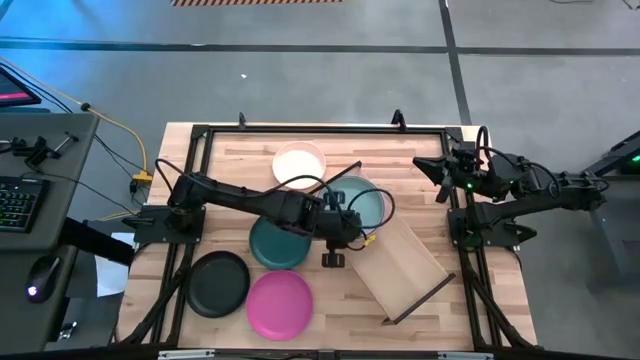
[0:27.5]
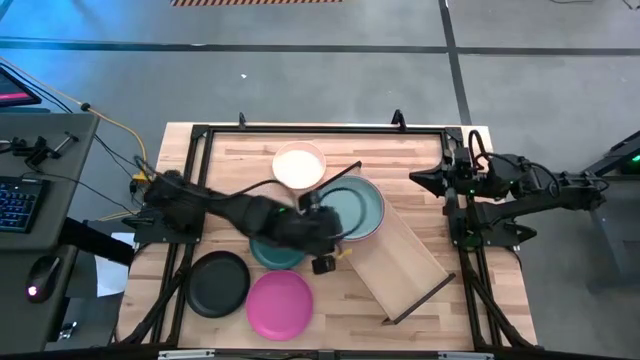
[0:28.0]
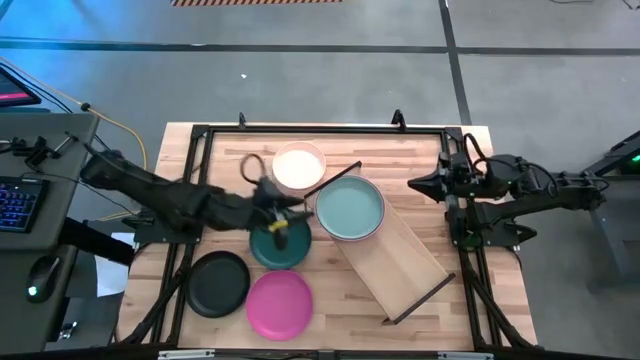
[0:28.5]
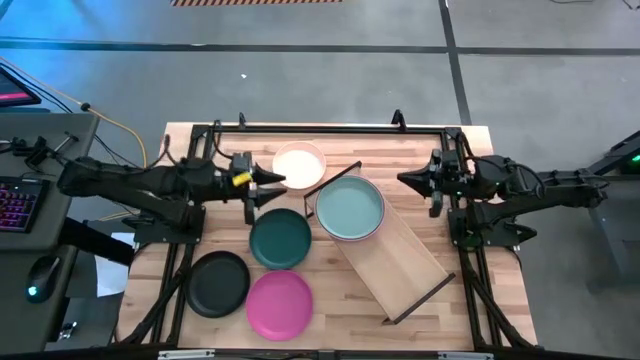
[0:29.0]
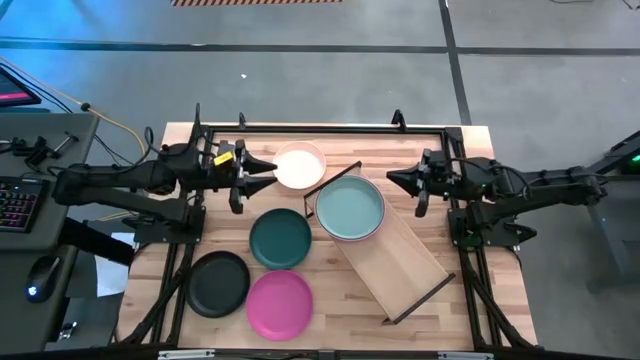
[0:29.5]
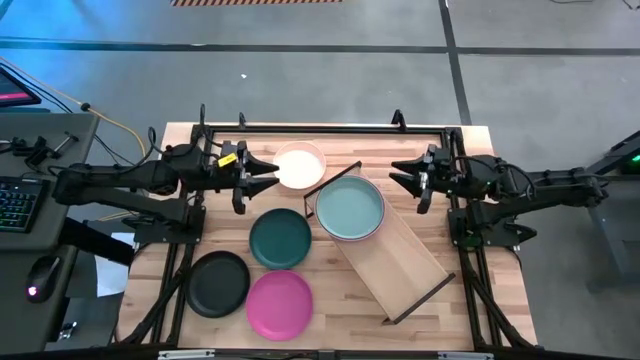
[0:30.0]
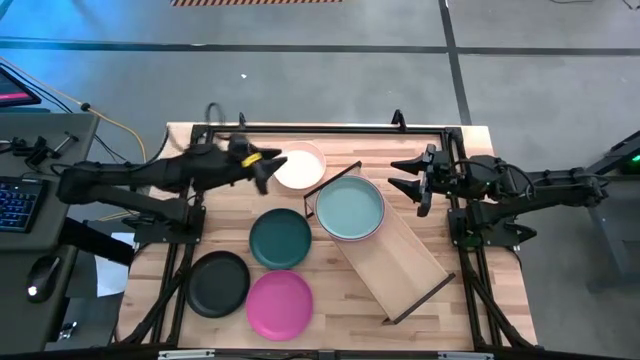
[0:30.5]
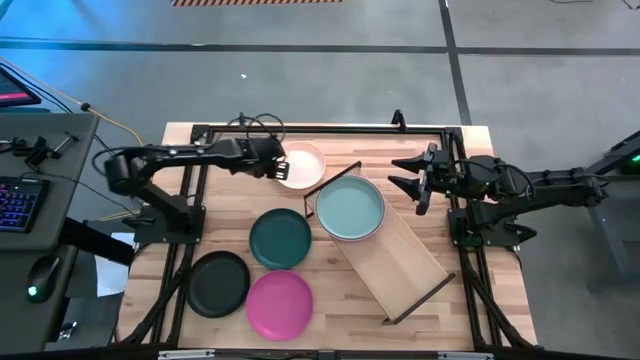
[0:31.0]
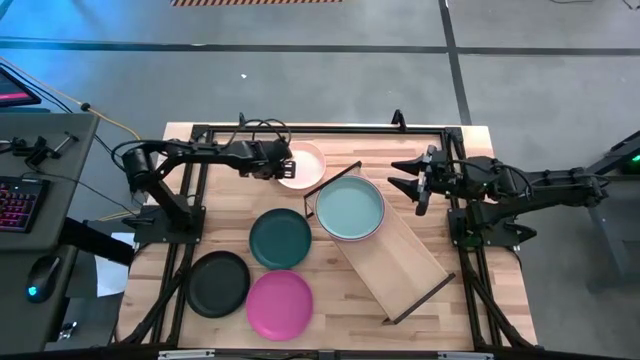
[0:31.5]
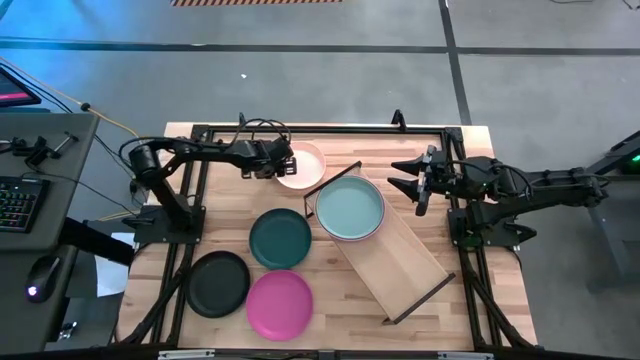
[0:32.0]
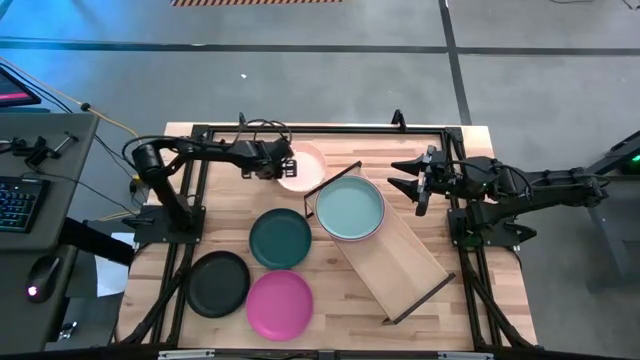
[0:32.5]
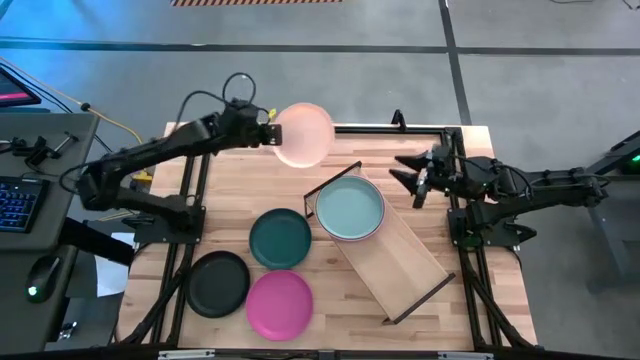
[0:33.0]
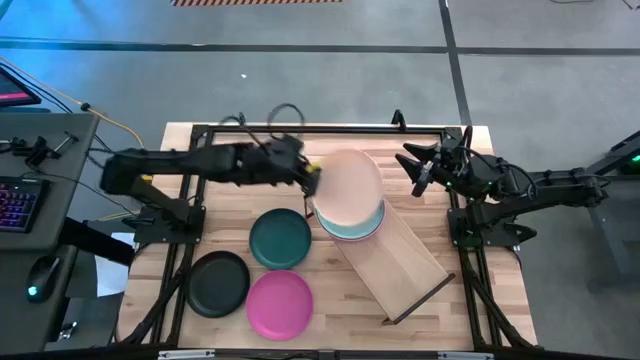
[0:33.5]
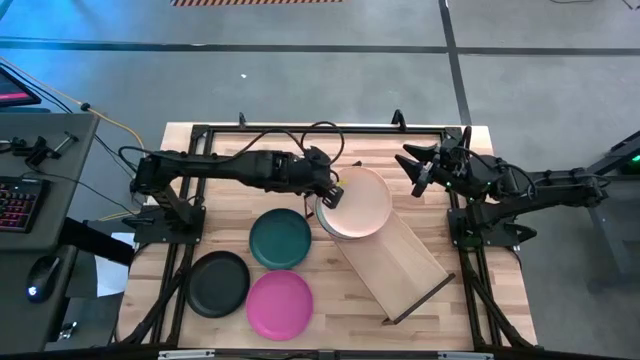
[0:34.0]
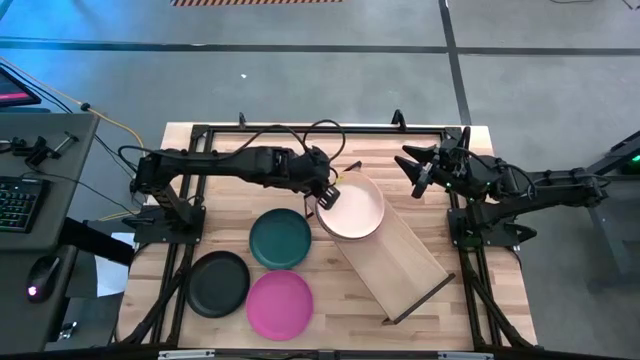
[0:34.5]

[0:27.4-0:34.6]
Task: Place and stack plates onto a shelf
Stack the light pink plate on the blue plate

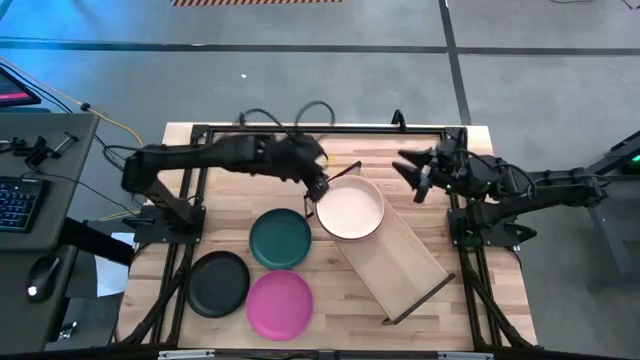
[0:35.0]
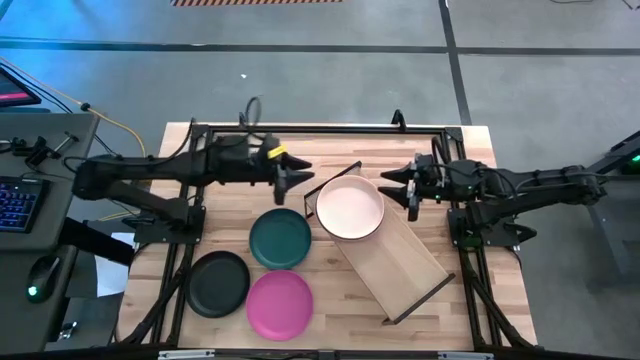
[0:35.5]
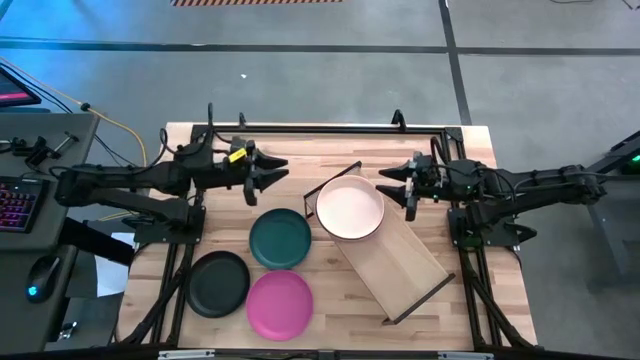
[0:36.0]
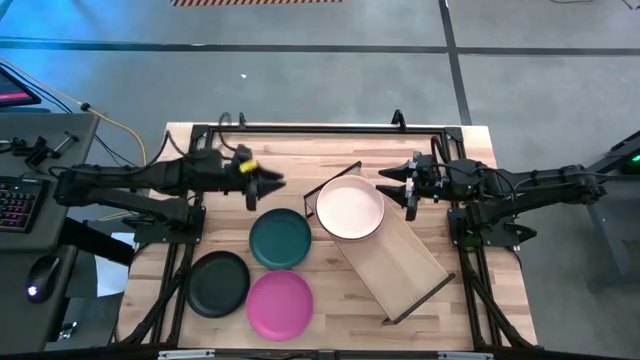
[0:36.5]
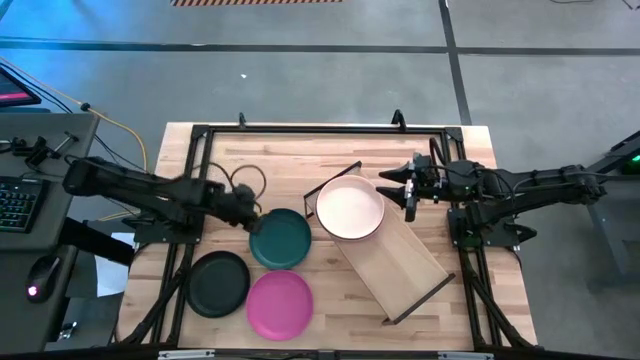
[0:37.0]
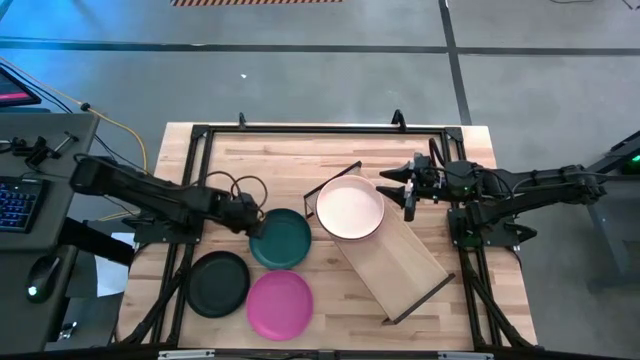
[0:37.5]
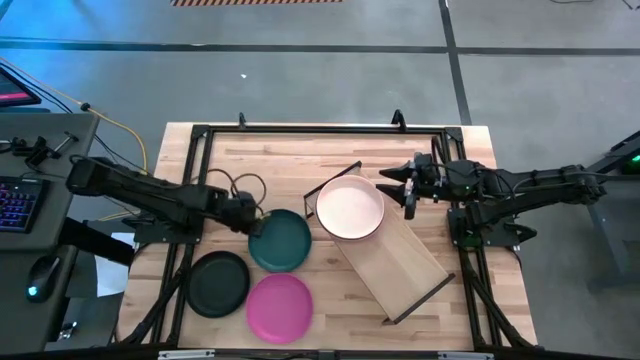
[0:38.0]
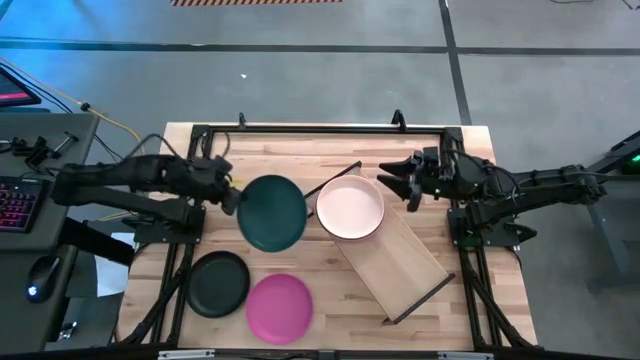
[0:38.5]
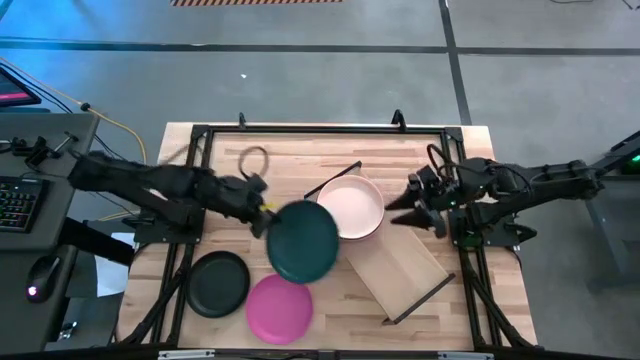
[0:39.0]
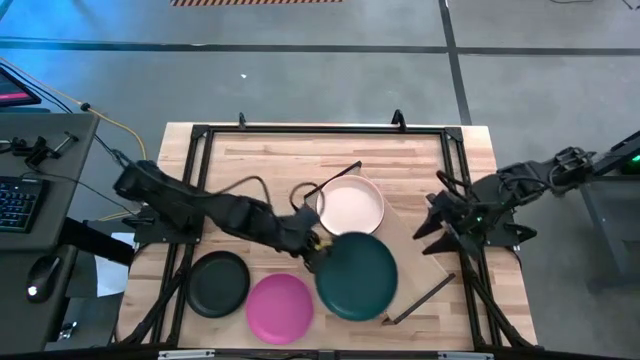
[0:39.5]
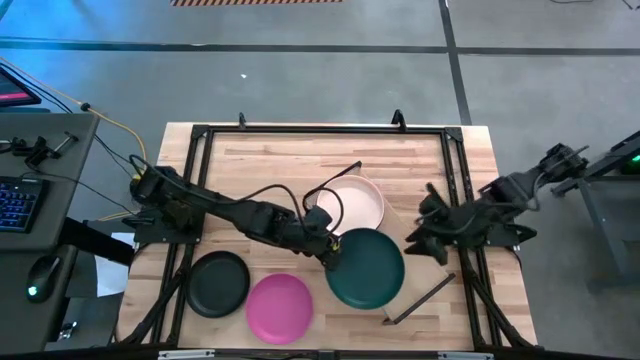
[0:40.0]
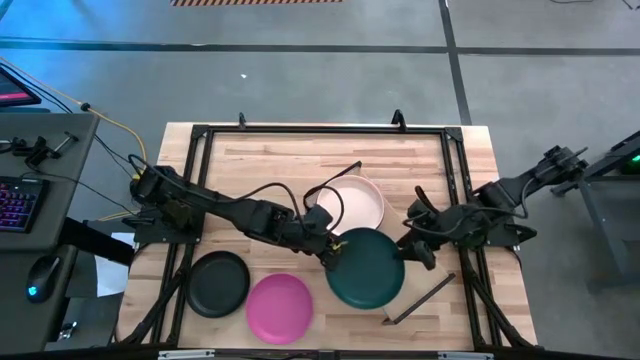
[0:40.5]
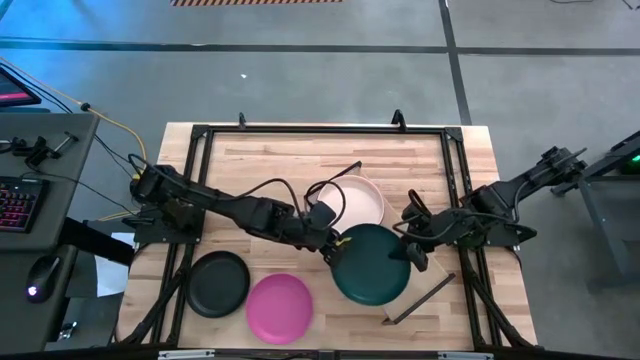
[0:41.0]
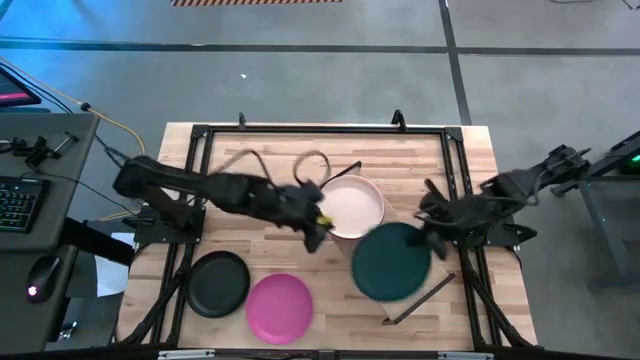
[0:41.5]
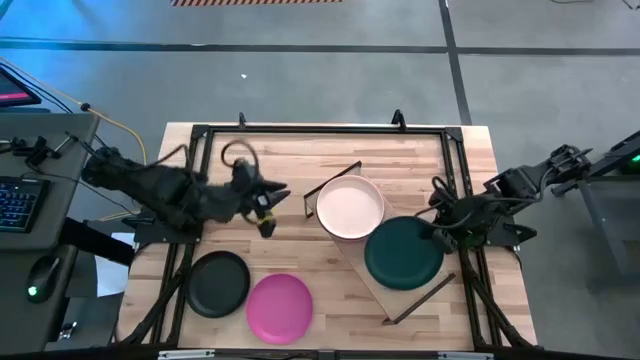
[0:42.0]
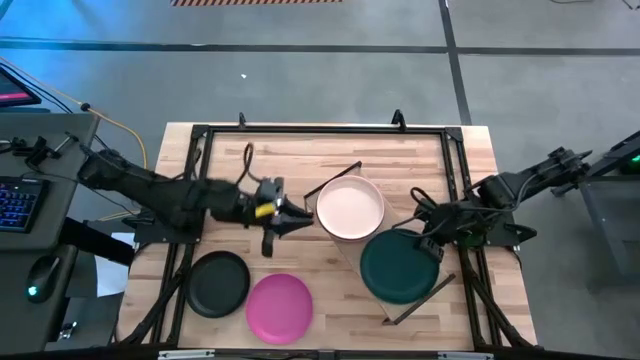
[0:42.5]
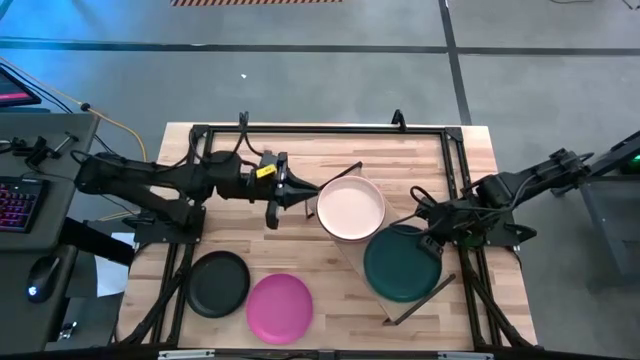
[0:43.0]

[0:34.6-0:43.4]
Put the green plate on the shelf

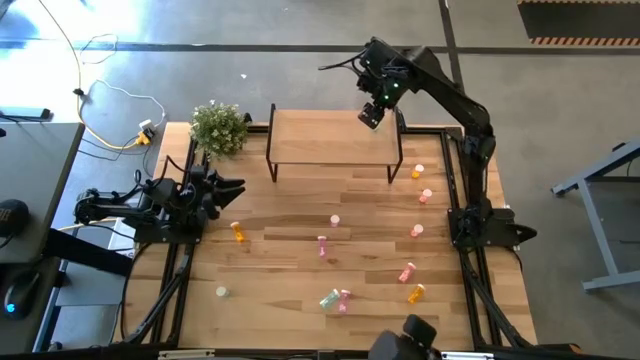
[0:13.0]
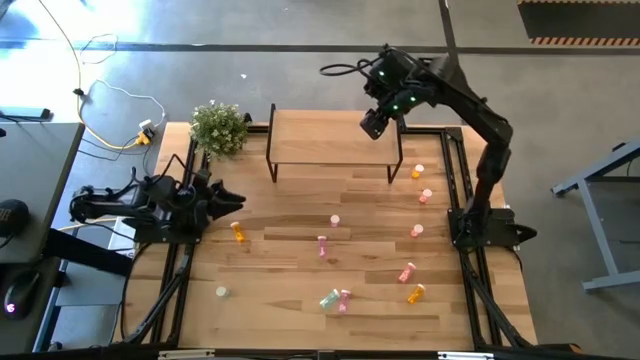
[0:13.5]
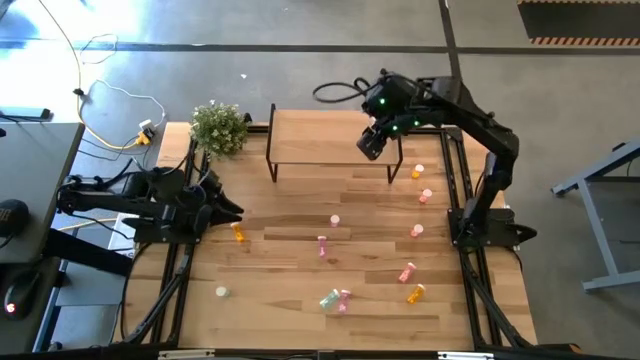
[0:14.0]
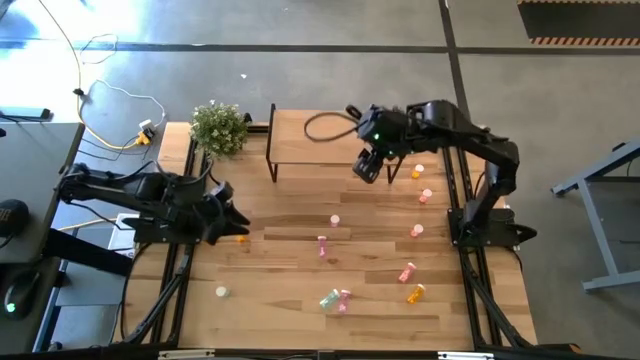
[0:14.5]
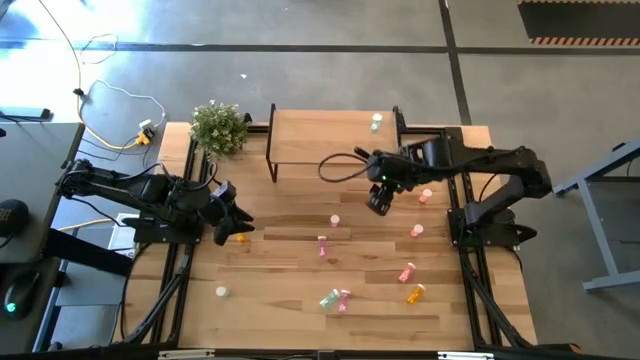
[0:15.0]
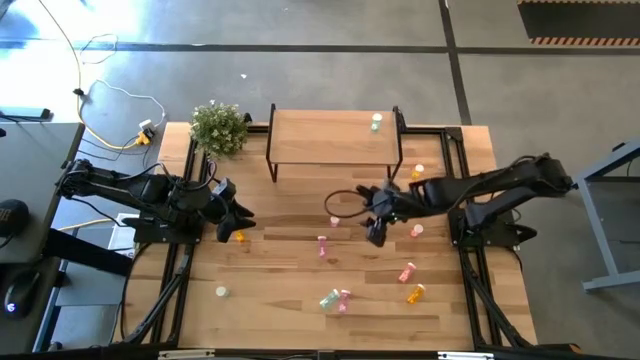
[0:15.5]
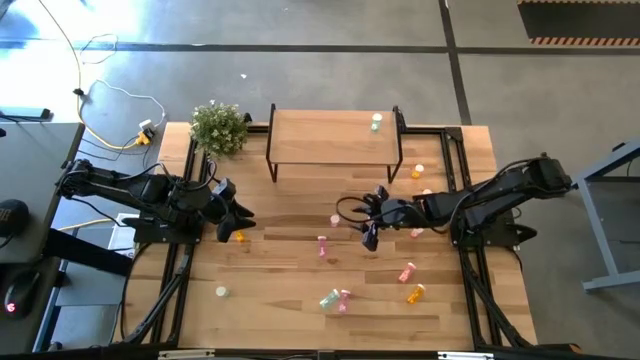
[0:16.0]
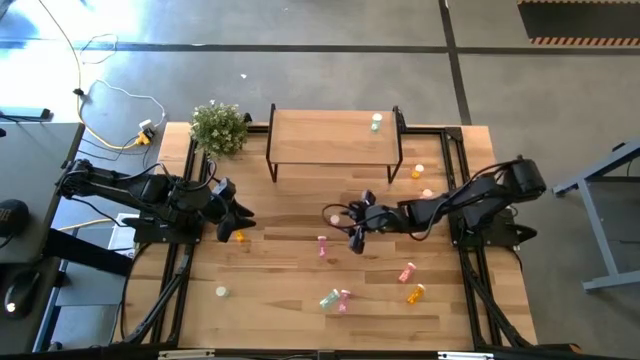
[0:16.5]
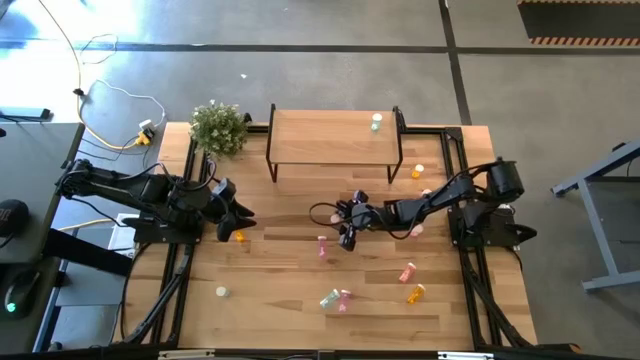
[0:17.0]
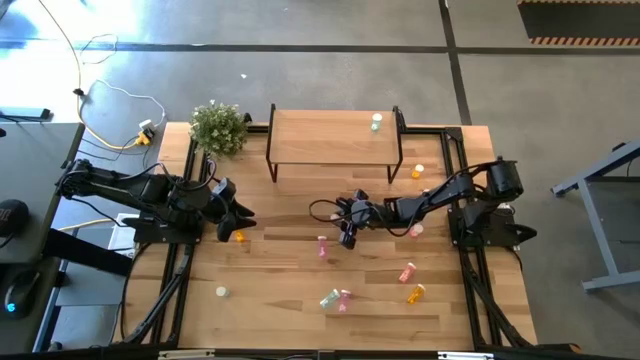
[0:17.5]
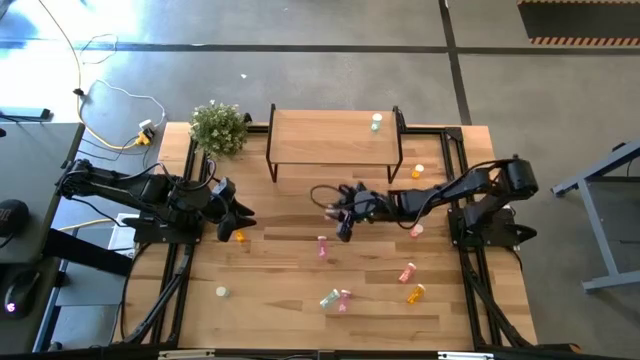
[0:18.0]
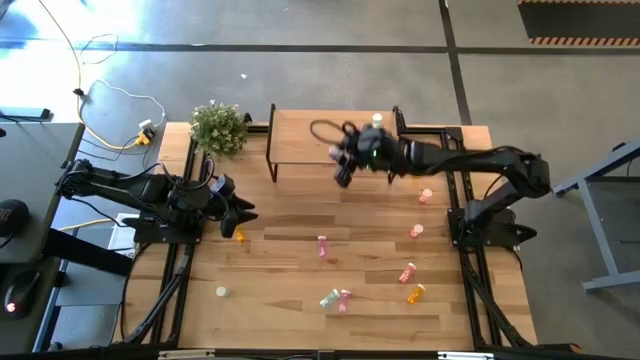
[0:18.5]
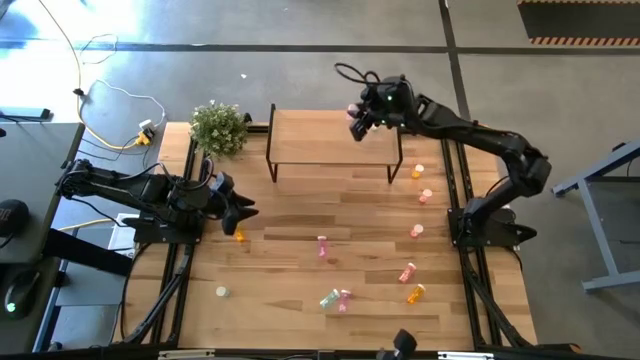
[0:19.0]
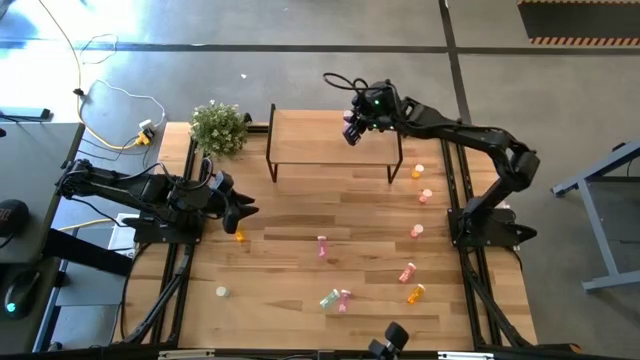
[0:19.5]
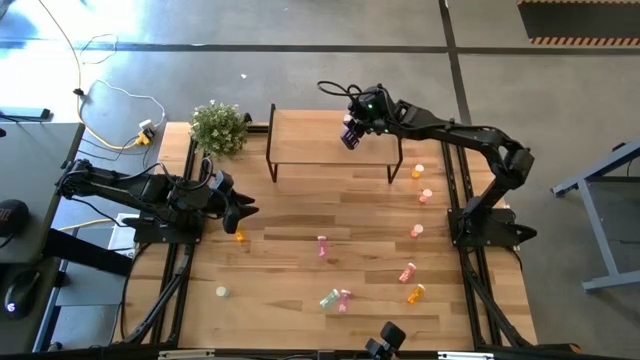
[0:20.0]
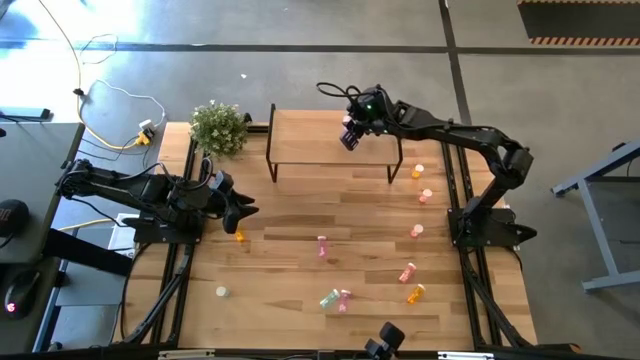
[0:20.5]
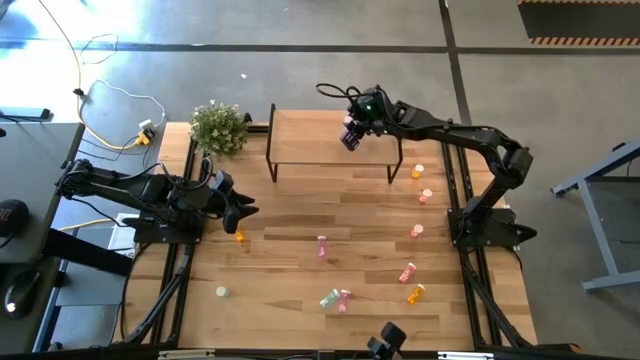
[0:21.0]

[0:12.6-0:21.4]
Task: Pick and place medicine bottles onto shelf by color
Put the top purple pill bottle on the shelf
